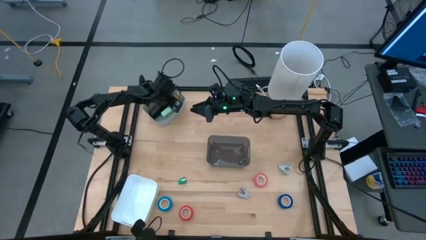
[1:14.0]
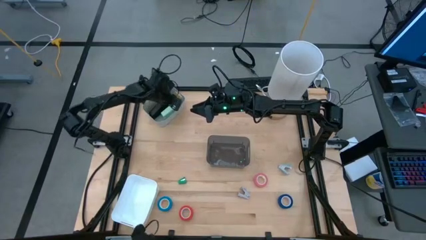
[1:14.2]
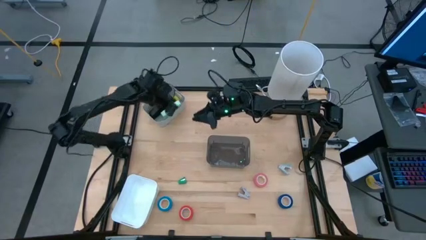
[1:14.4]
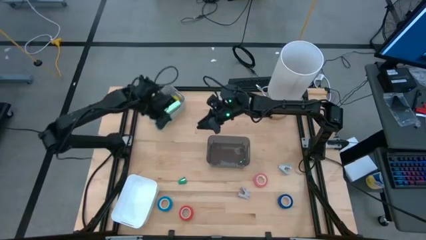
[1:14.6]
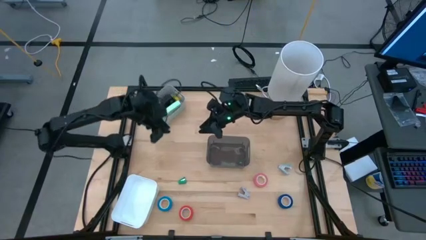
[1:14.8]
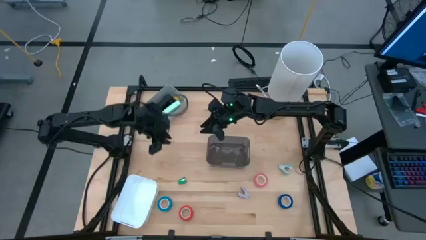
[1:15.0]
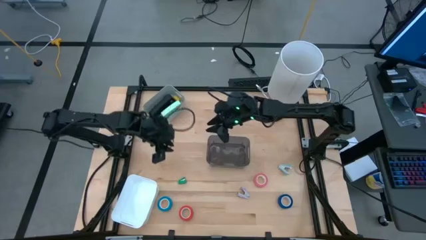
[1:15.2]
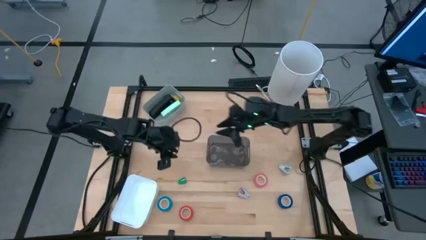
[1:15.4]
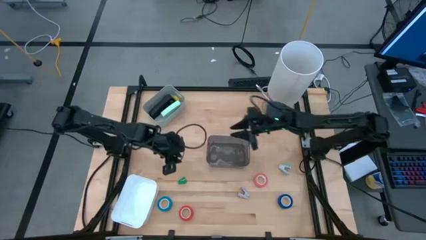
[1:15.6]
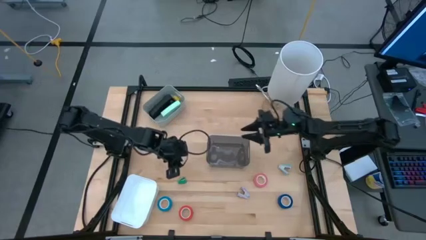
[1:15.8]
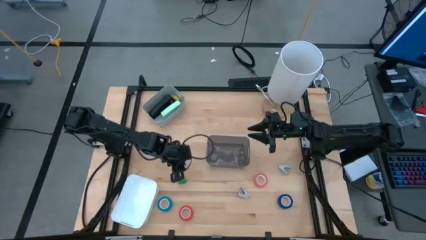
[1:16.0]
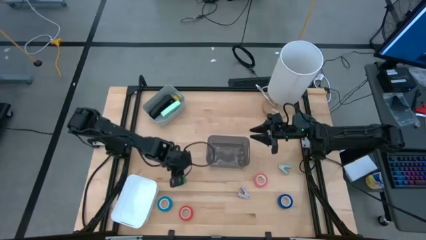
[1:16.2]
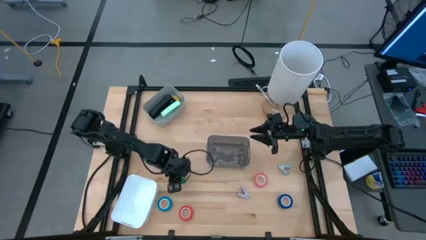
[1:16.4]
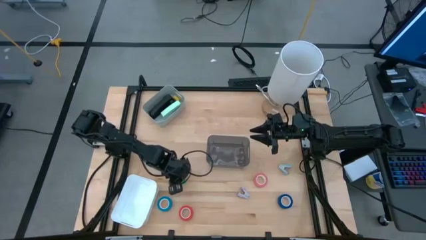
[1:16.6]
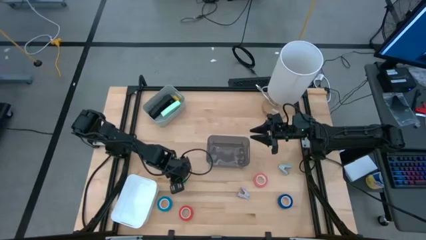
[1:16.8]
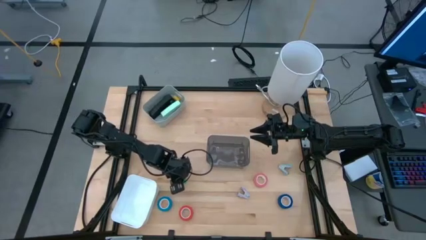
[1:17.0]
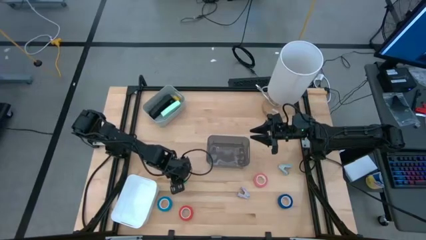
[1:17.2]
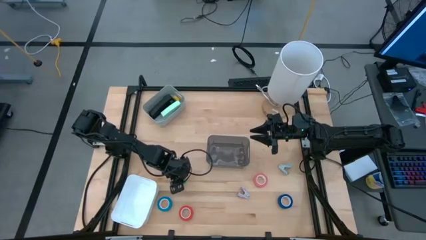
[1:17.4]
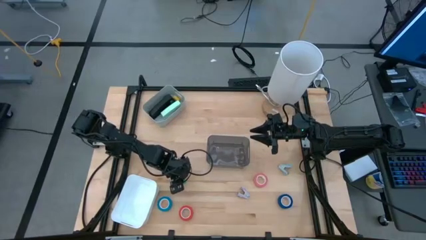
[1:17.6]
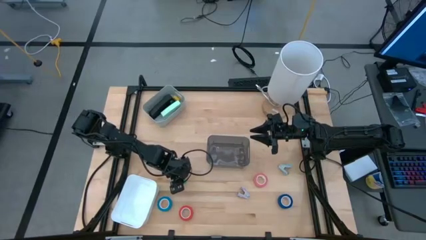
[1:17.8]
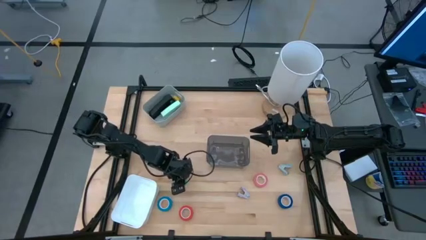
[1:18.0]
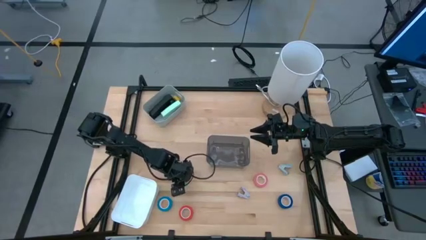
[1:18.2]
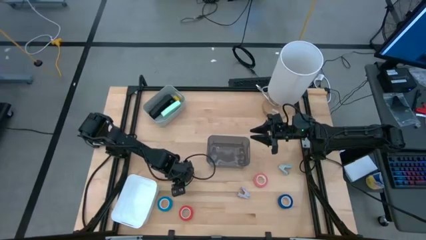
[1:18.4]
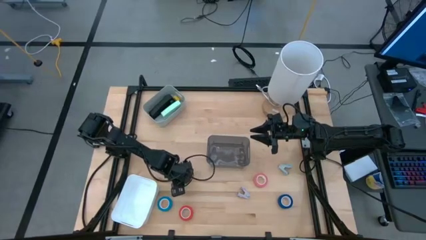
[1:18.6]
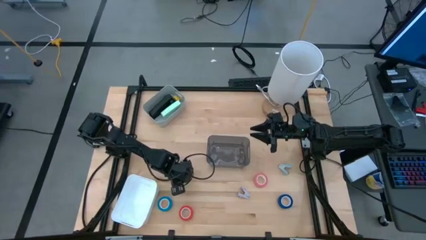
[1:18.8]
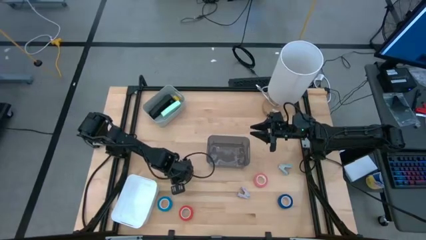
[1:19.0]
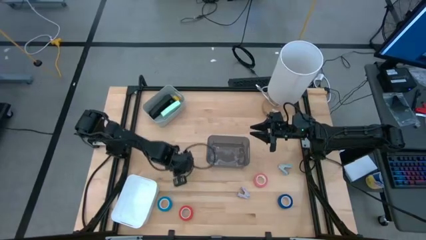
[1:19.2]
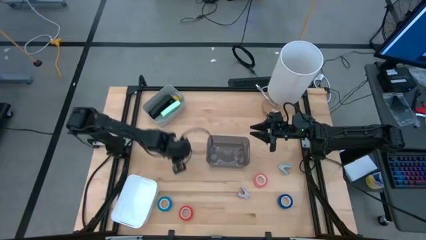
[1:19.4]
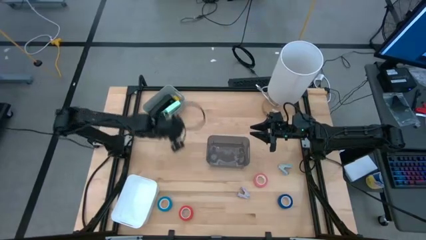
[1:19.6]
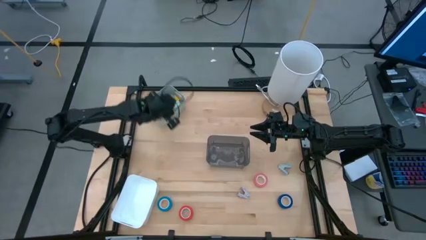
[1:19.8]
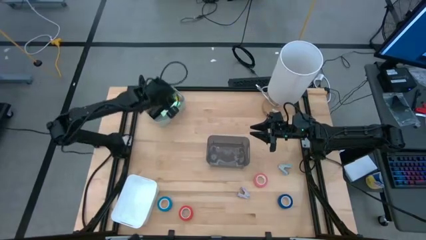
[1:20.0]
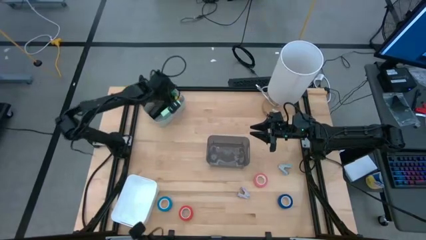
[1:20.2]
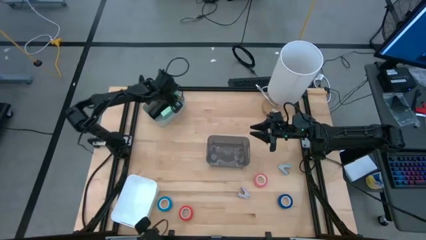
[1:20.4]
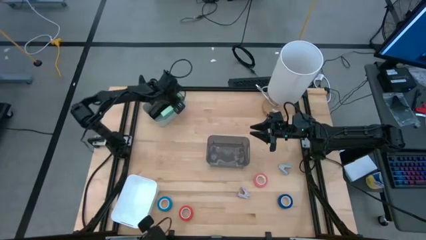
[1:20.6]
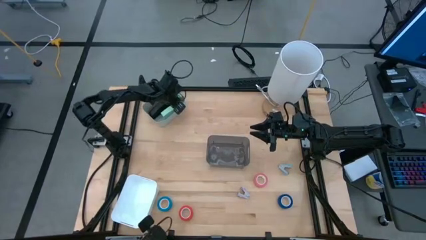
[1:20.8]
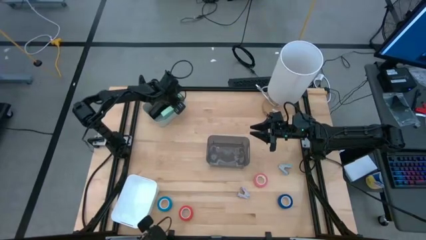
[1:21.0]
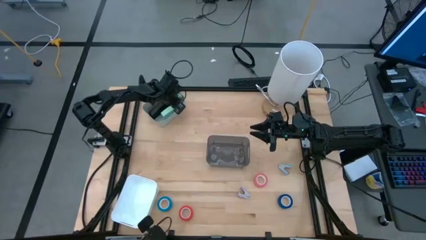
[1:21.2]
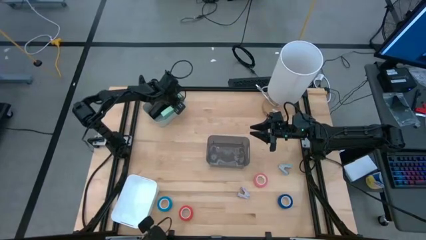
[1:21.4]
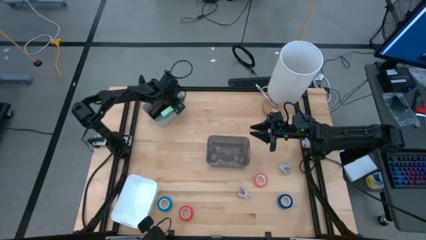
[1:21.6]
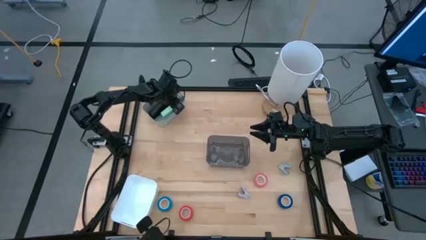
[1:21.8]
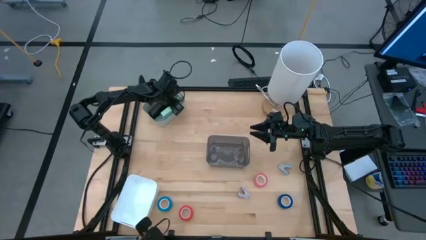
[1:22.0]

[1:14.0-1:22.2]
Task: Pick and place Stapler, Stapler remover, tape
Put the green stapler into the gray bin

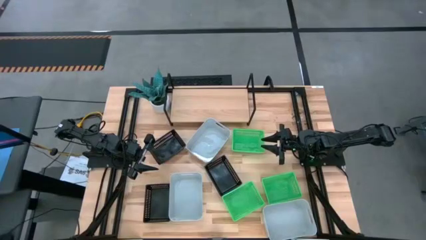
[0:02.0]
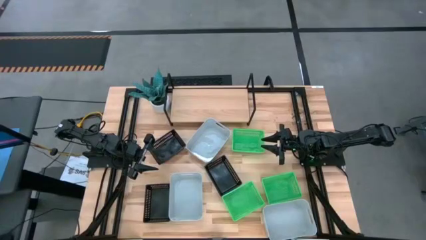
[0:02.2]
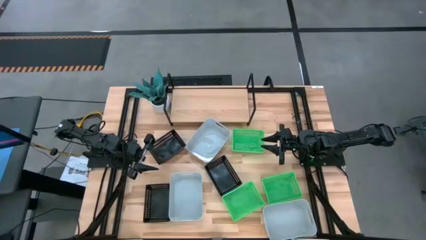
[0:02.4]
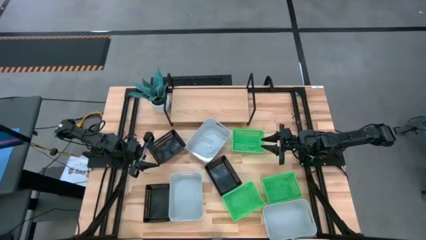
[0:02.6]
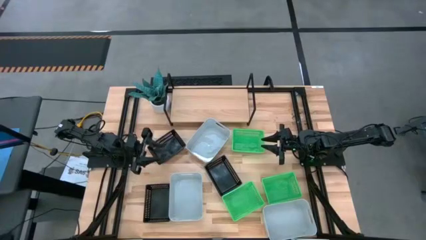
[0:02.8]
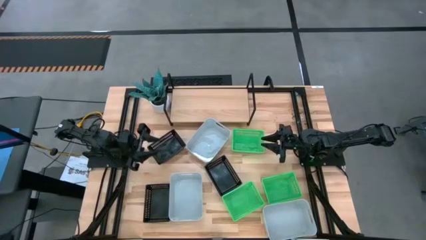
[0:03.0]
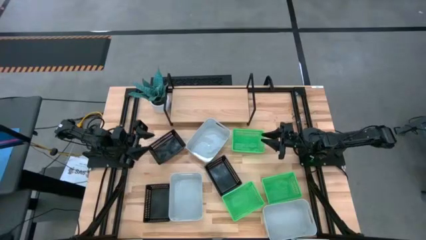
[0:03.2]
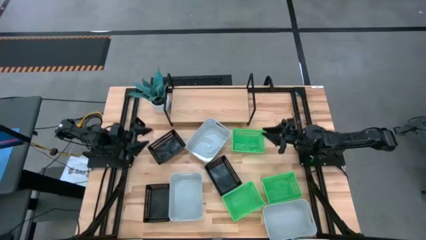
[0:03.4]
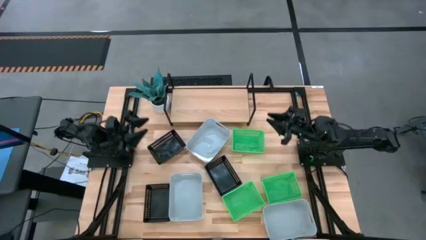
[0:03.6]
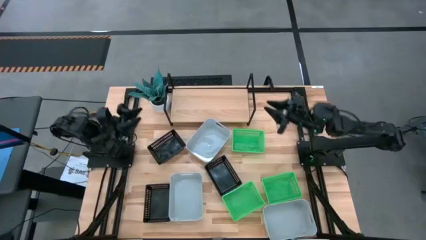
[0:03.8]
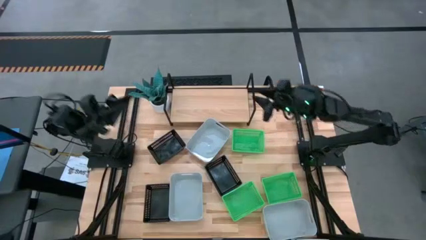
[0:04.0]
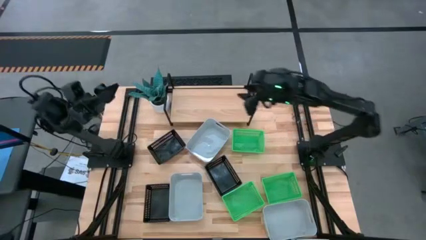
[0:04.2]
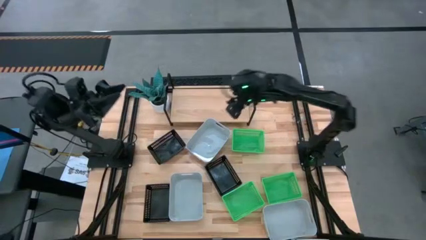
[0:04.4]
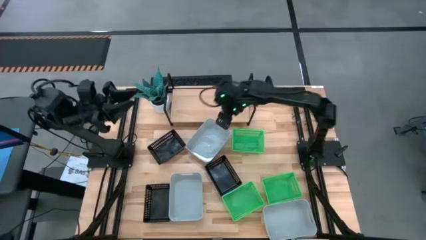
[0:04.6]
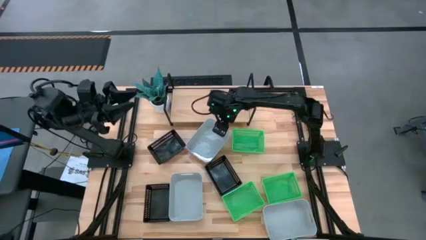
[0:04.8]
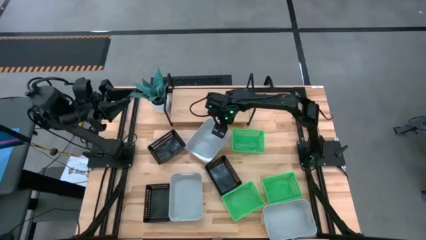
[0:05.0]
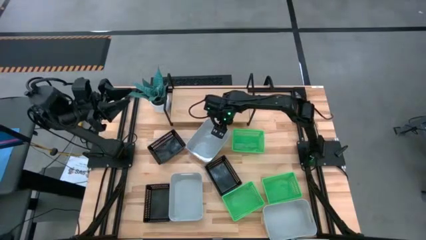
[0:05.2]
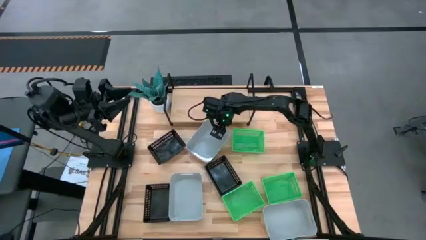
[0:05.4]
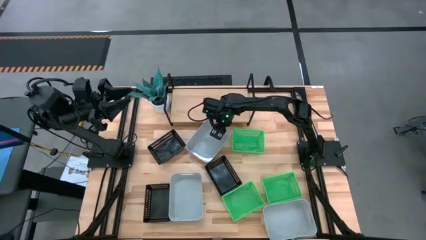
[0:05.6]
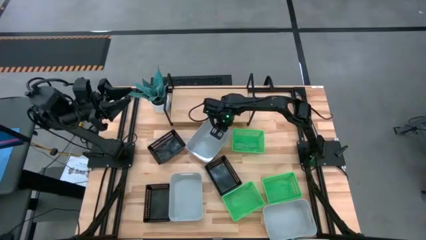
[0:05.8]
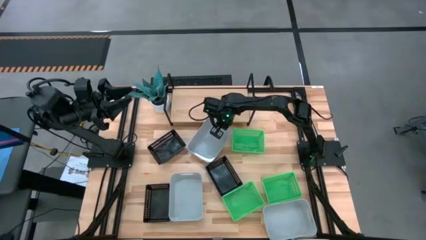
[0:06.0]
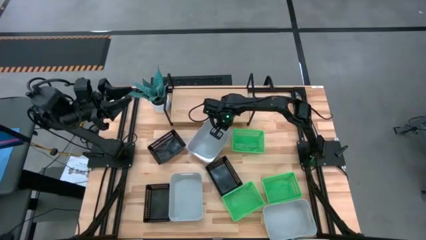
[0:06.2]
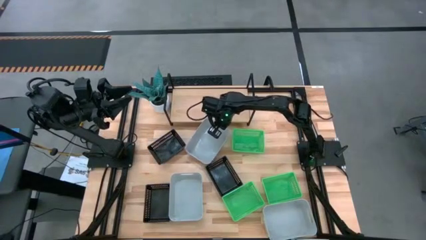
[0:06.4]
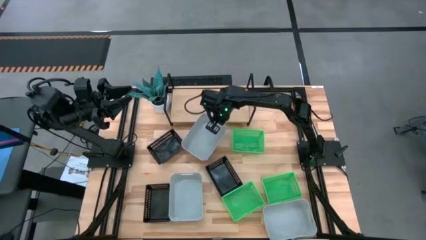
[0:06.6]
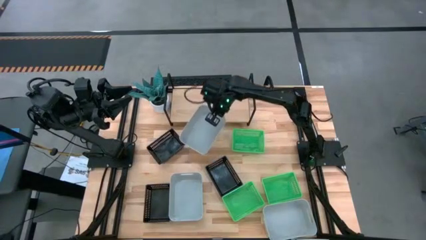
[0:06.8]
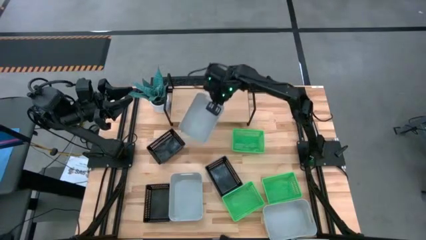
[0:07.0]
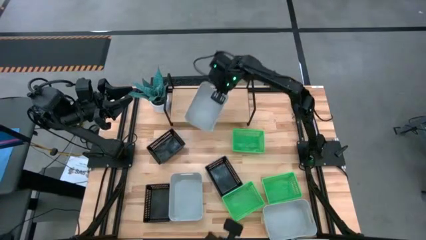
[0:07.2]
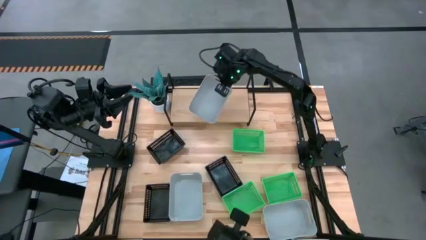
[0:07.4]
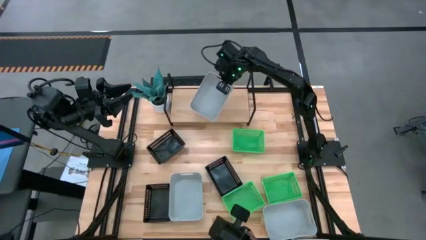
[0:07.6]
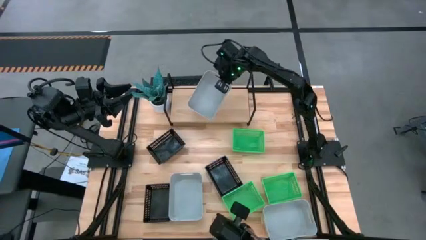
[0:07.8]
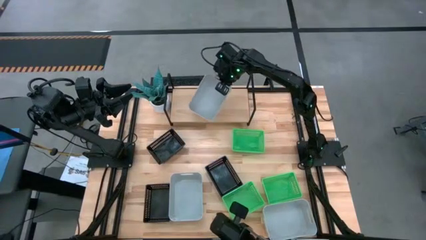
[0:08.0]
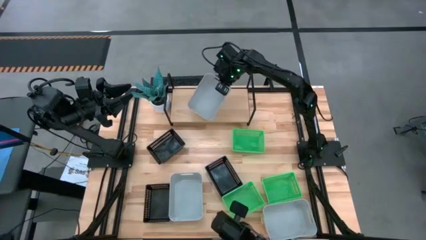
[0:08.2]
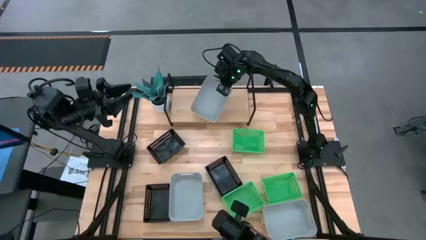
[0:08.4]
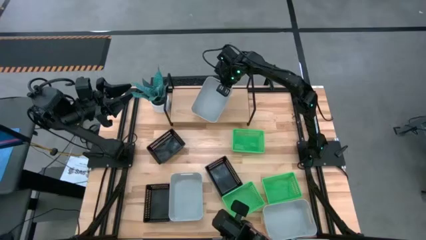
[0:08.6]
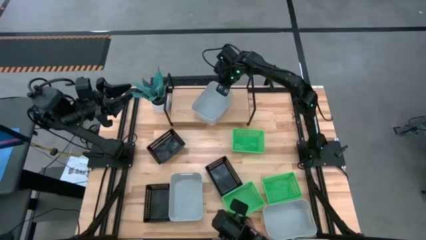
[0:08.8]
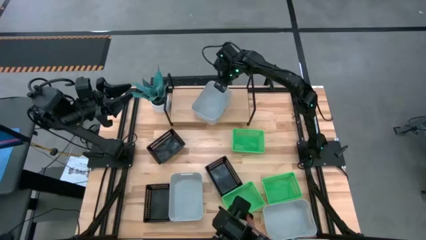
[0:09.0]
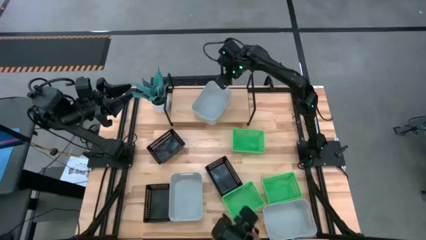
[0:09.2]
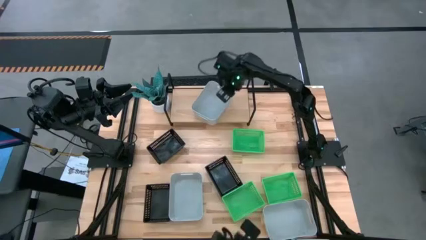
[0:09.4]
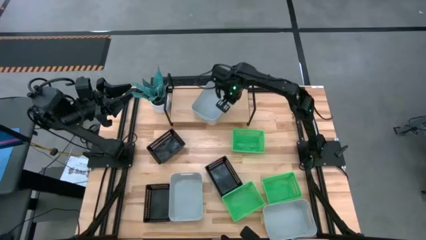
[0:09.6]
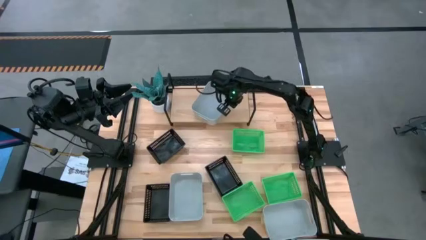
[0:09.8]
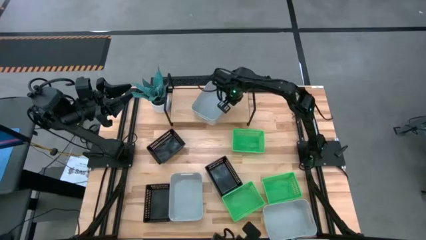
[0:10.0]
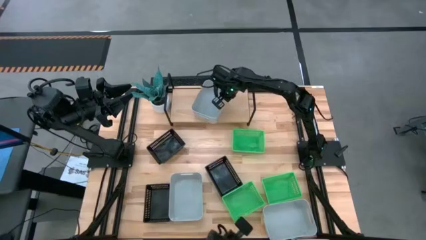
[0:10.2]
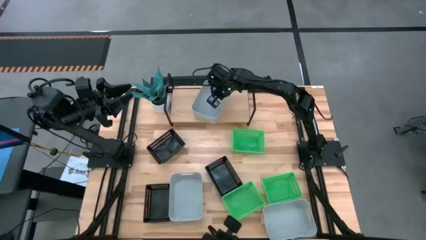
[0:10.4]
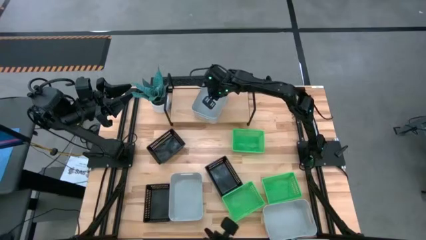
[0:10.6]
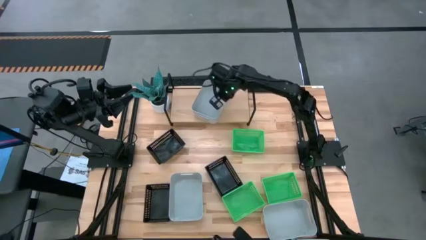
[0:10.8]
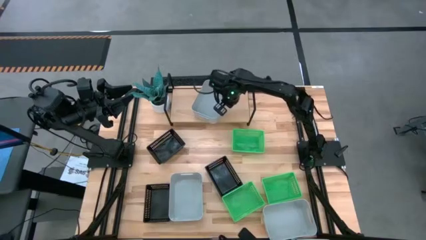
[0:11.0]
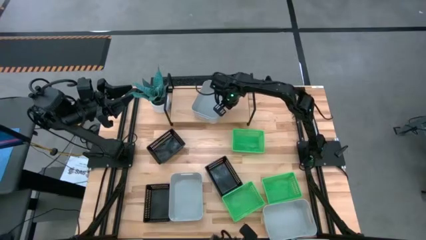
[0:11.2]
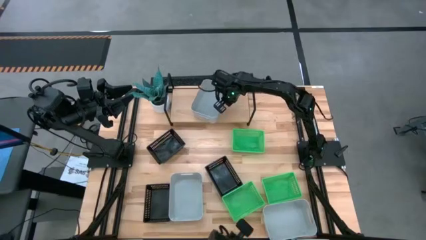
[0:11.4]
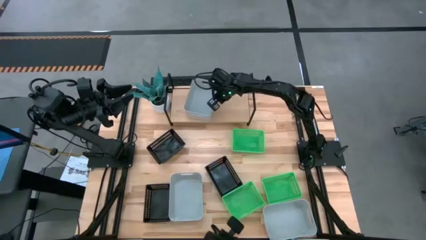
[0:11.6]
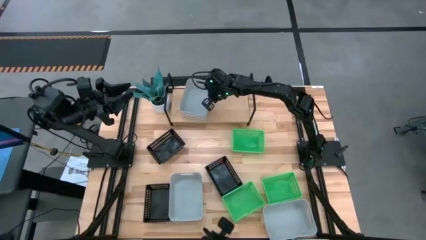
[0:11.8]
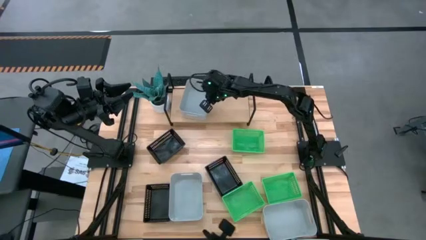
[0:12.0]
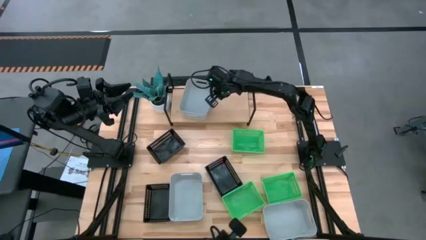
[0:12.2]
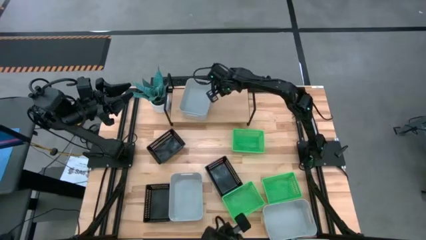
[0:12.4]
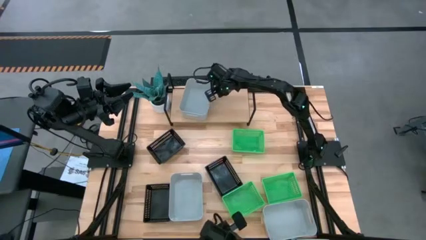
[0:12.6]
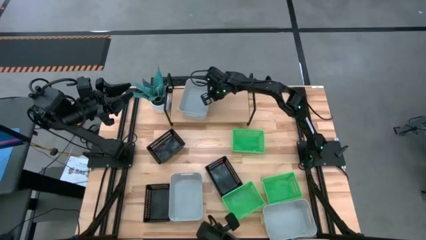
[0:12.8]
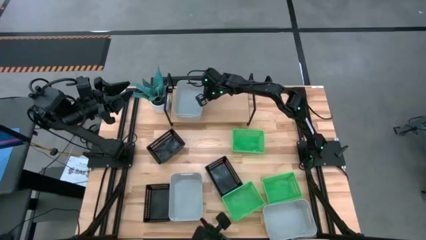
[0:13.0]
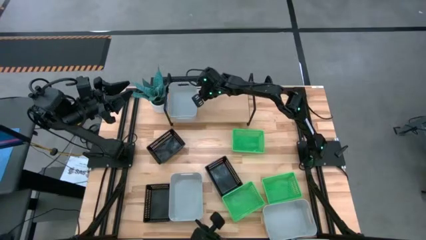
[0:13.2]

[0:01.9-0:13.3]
Task: Stack baskets on shelf by color
Put the top gray bin on the shelf
